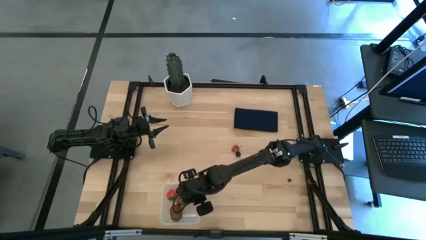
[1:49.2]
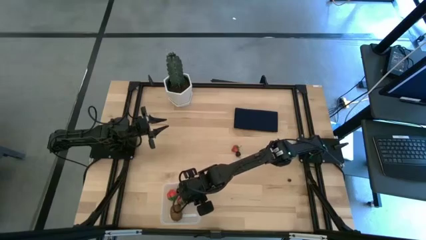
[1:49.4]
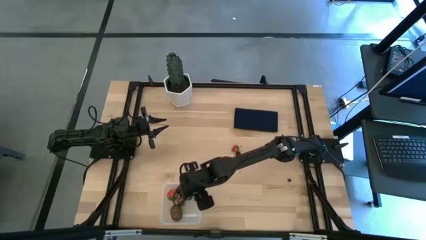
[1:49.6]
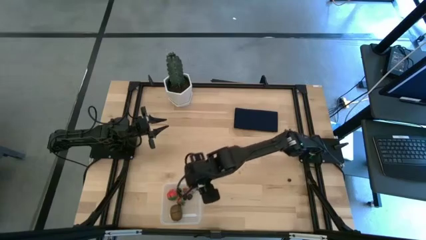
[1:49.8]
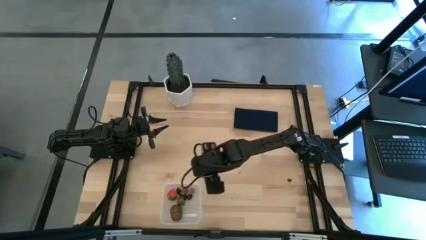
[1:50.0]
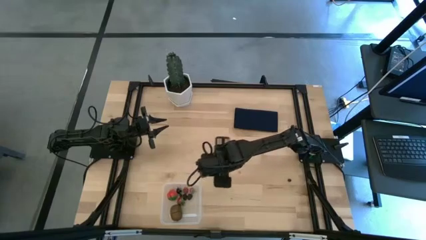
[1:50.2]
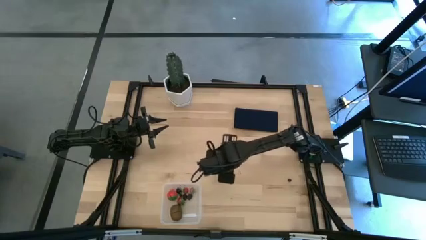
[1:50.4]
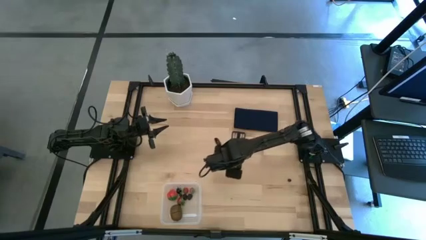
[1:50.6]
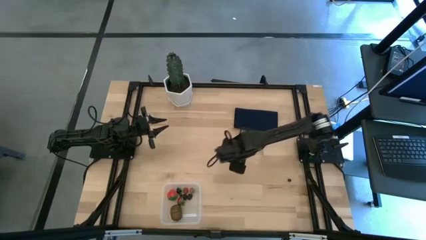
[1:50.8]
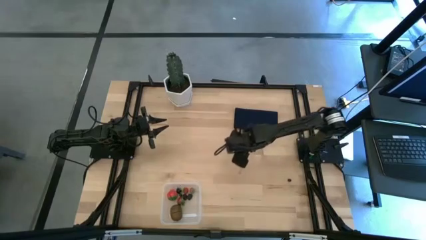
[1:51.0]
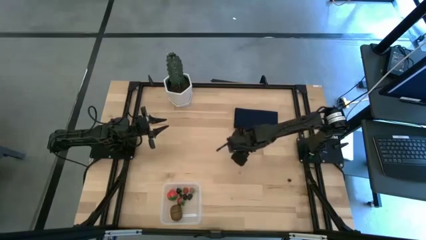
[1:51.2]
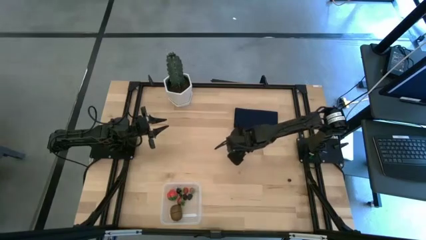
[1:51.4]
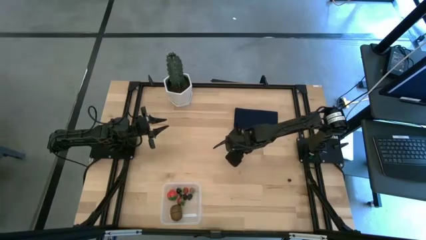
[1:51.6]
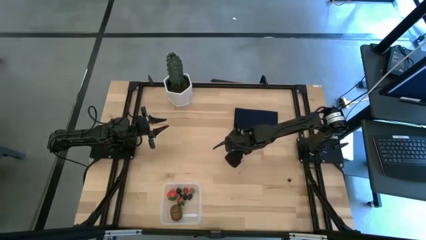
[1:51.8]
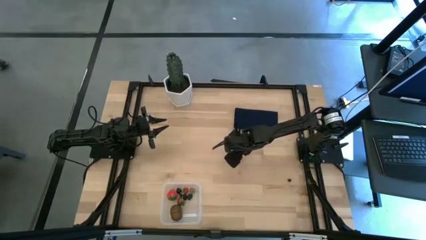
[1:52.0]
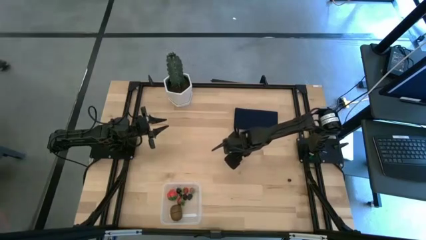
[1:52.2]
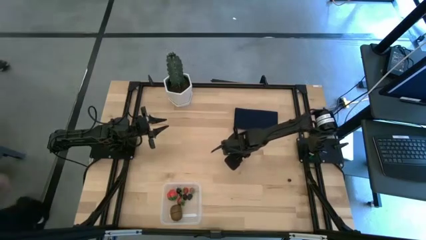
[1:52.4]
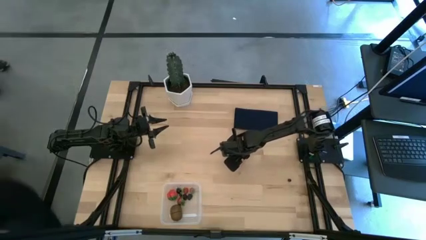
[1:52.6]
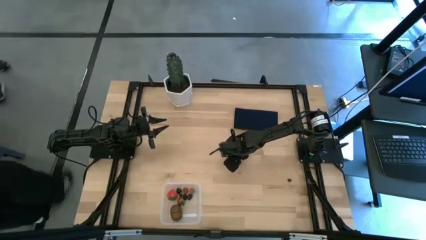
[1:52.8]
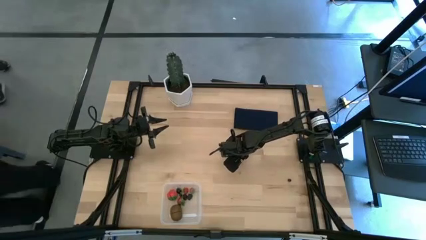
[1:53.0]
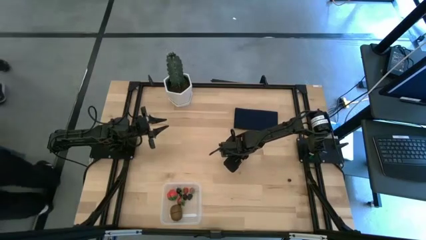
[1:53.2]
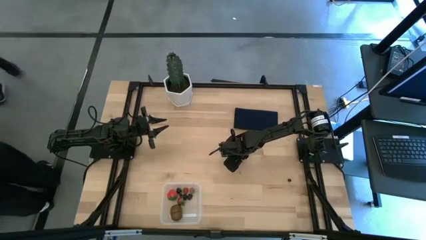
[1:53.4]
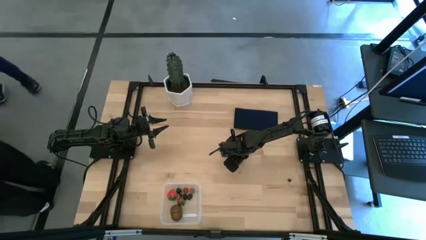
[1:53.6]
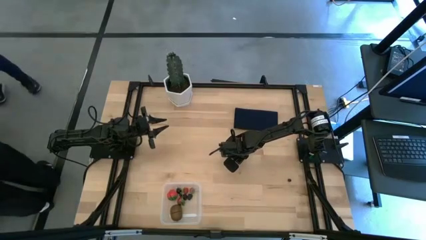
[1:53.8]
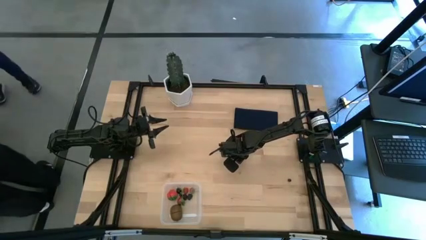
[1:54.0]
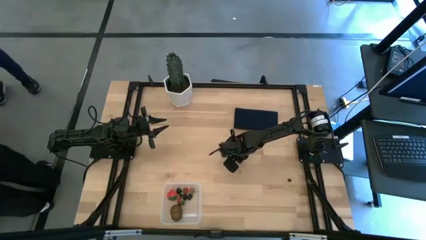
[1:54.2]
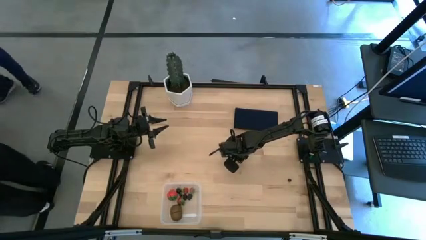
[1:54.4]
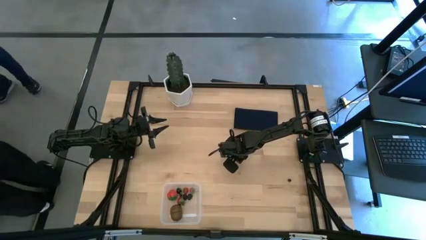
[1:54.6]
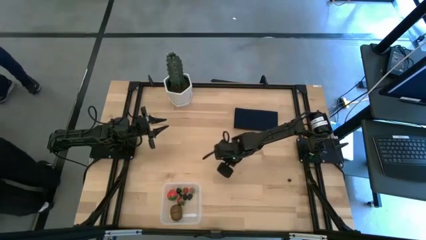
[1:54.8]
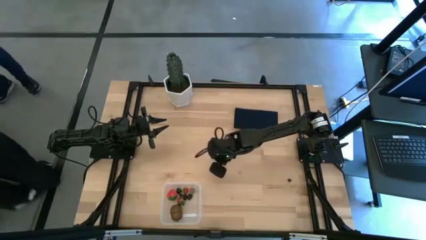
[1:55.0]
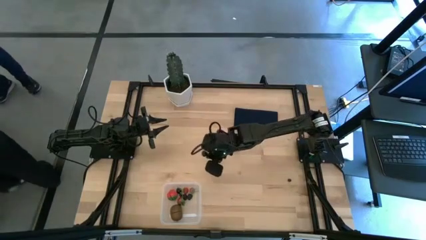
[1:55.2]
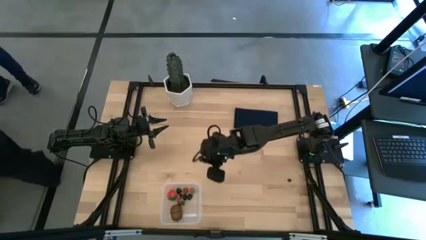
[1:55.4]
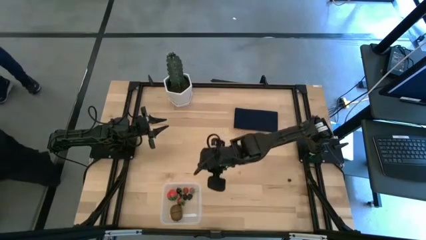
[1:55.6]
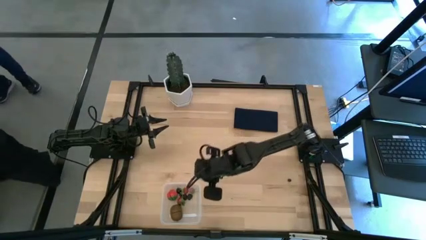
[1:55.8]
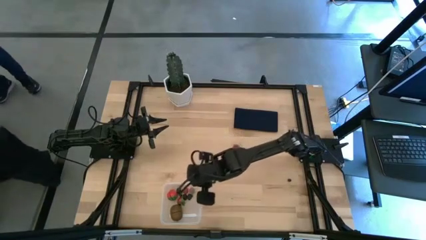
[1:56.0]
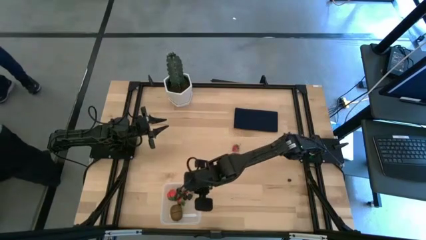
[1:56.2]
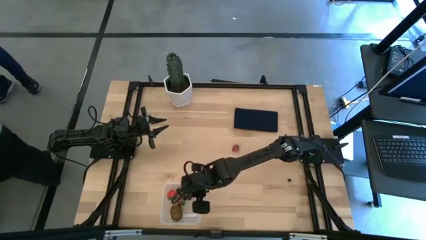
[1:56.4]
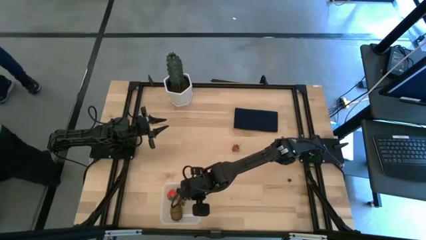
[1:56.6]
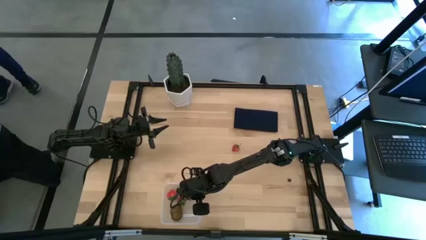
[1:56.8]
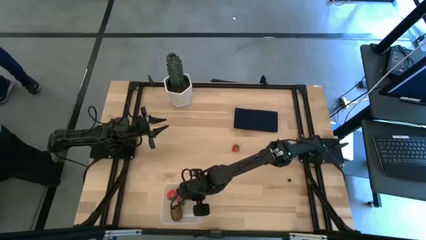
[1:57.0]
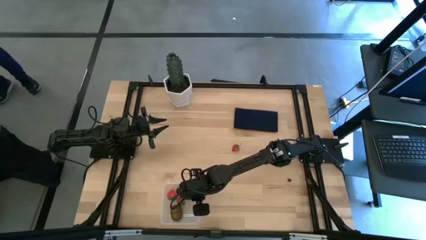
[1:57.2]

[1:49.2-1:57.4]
Task: Pick and placing Produce into tupperware
Put the black cherry in the transparent bin

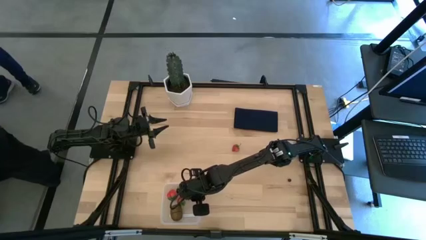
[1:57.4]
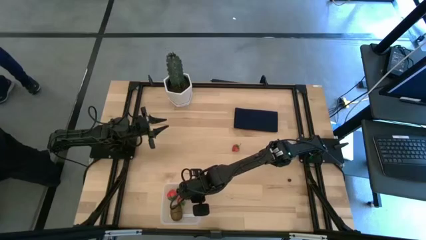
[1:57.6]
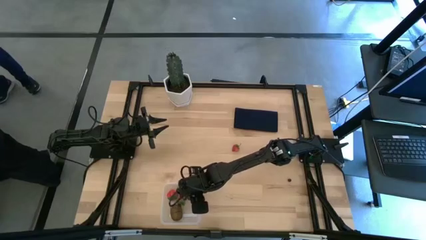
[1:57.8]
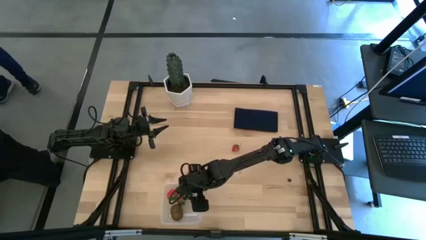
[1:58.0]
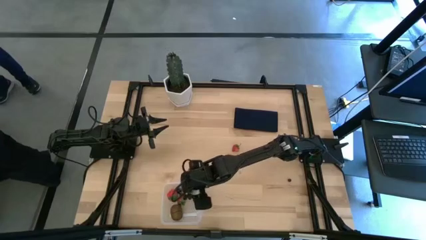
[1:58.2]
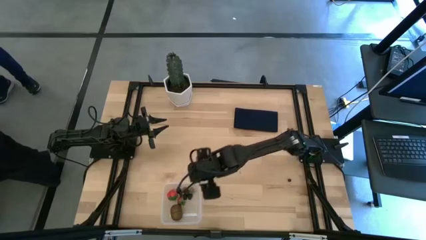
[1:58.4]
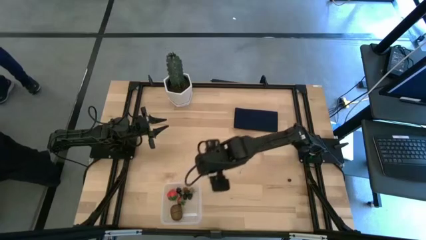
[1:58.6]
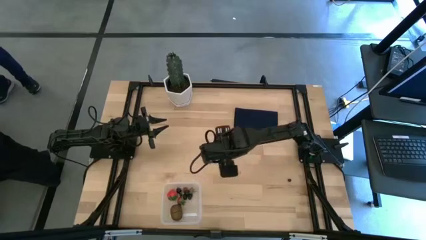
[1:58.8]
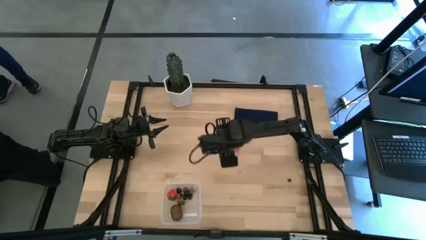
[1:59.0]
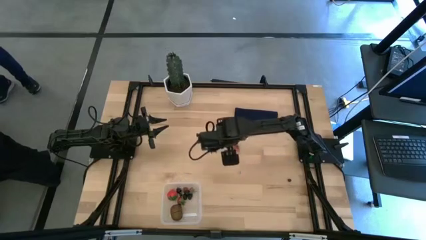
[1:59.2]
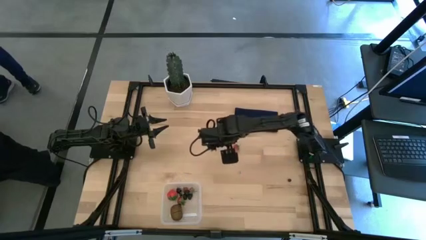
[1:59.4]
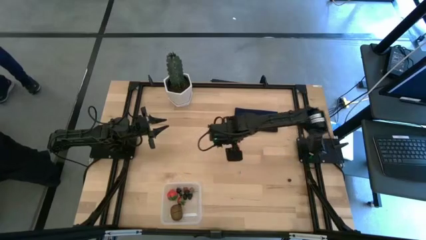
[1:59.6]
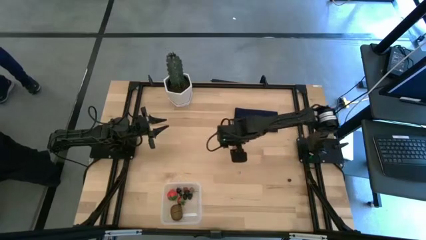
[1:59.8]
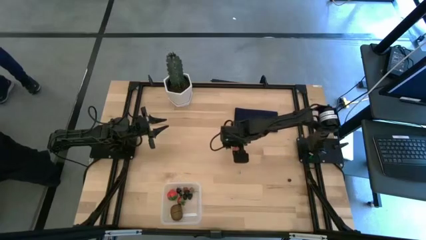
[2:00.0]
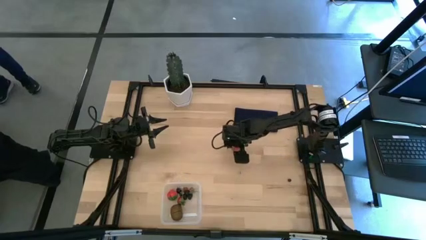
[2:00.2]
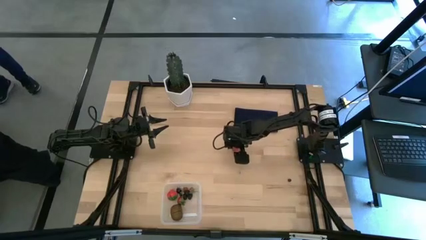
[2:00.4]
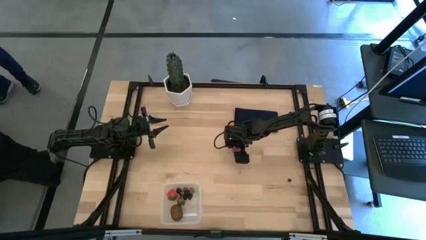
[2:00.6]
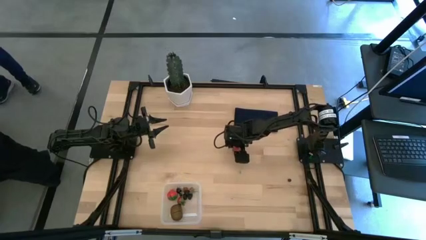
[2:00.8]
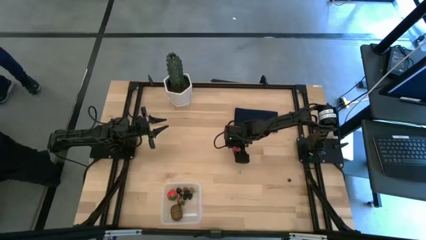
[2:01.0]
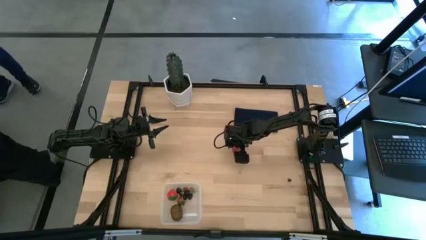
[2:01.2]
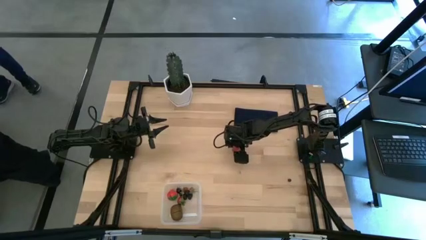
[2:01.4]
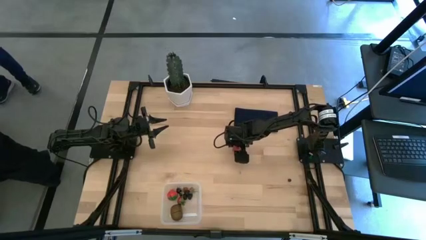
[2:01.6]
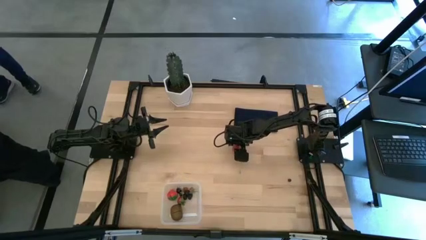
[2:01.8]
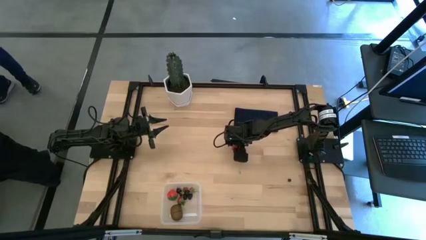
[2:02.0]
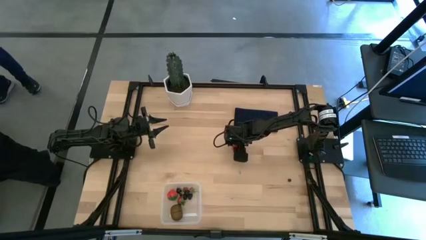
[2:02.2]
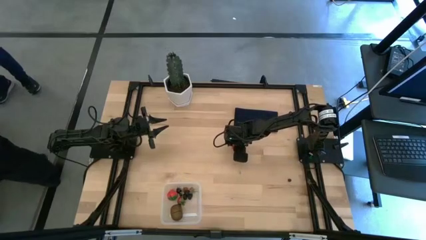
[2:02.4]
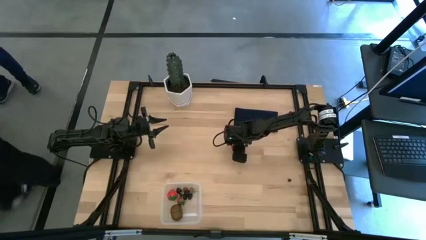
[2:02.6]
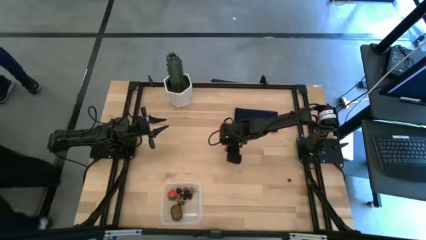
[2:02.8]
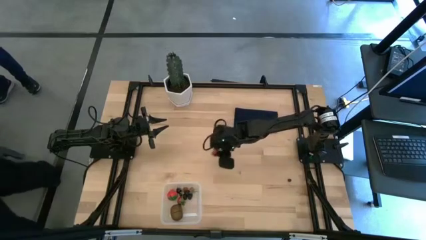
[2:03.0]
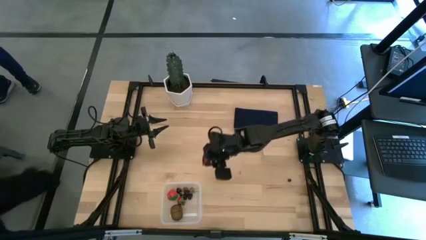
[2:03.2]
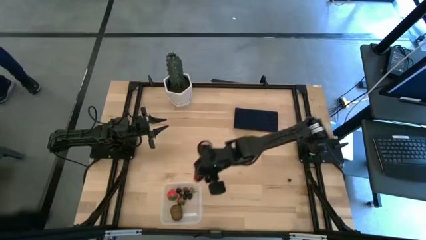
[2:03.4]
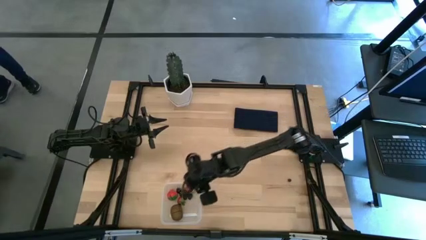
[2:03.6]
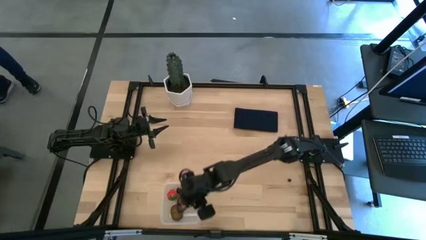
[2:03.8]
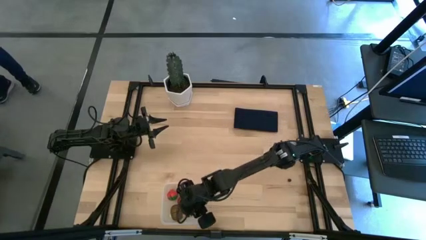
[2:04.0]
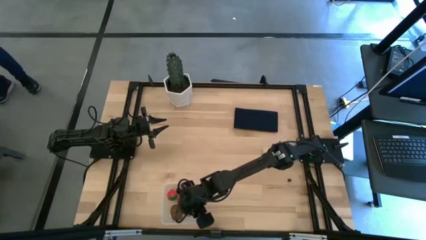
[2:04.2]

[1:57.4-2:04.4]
Put the strawberry in the transparent bin

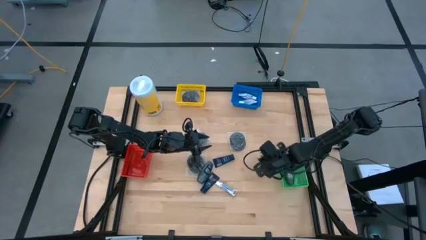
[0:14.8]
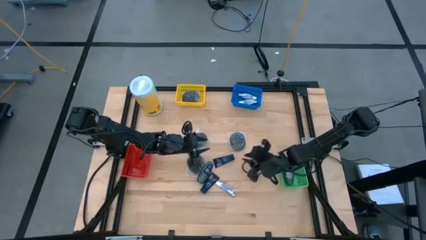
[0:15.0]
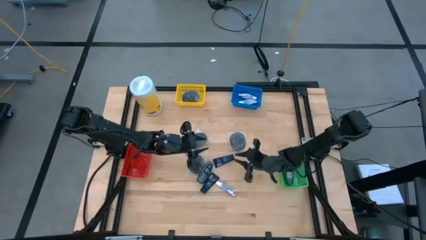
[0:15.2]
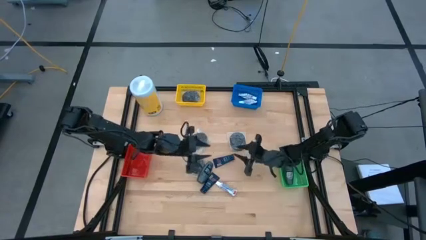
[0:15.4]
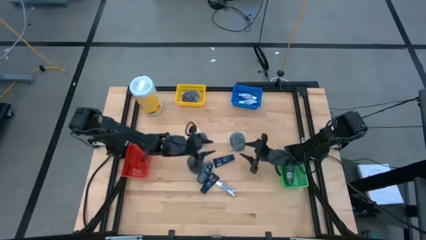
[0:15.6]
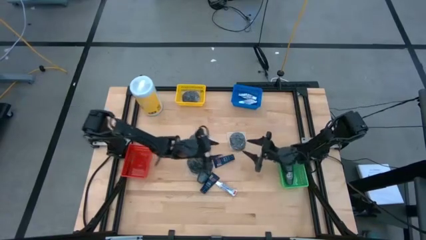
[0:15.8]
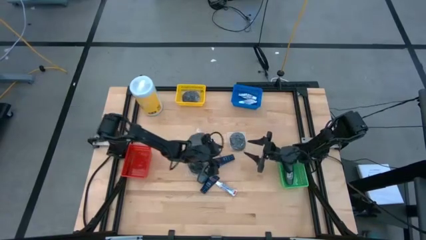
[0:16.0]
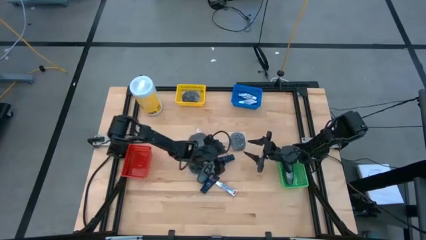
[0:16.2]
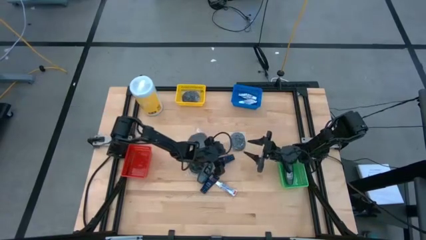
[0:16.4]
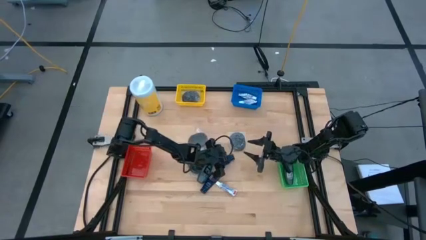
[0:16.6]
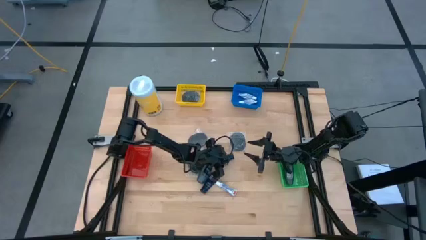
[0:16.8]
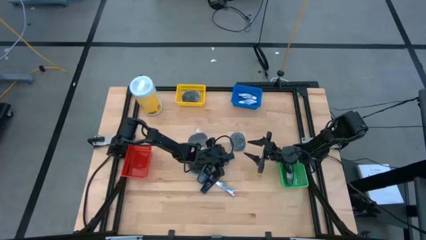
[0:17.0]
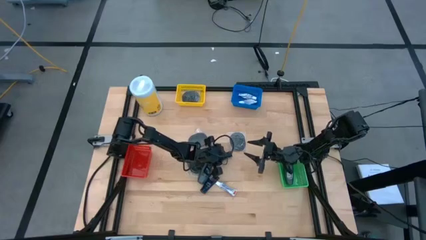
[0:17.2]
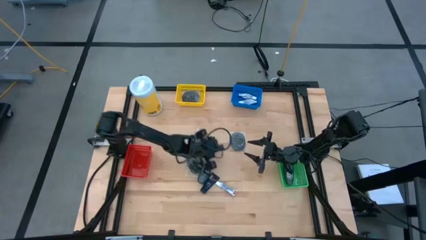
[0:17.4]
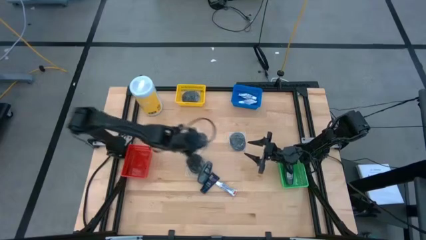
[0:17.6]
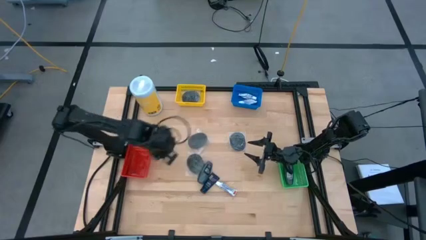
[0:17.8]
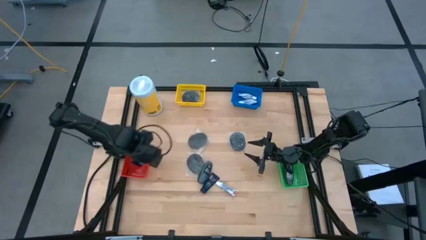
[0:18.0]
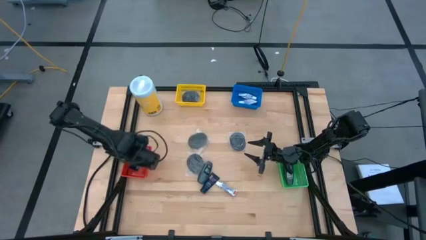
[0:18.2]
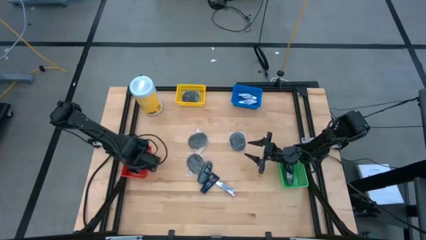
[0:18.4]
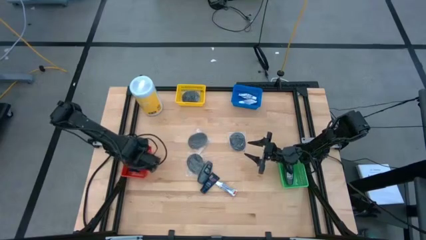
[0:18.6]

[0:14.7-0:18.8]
Task: Pick & Place Travel size toiletries
Put the blue shaving cream into the red bin
